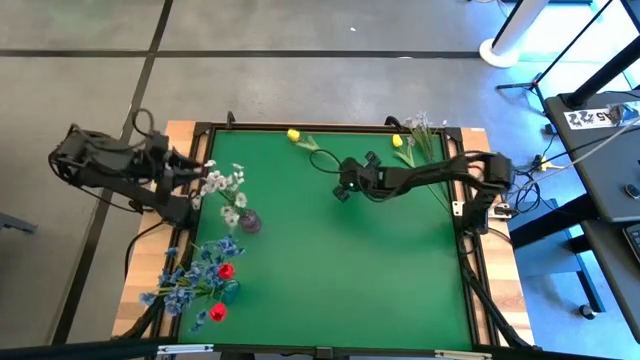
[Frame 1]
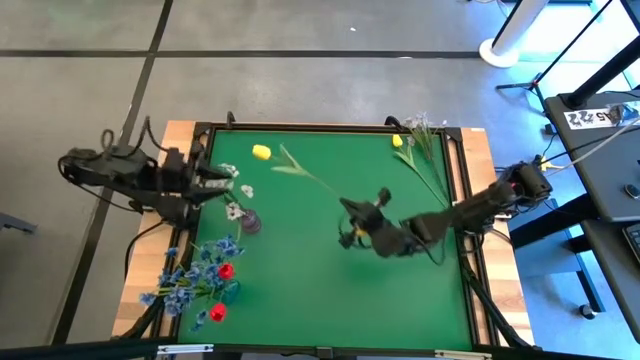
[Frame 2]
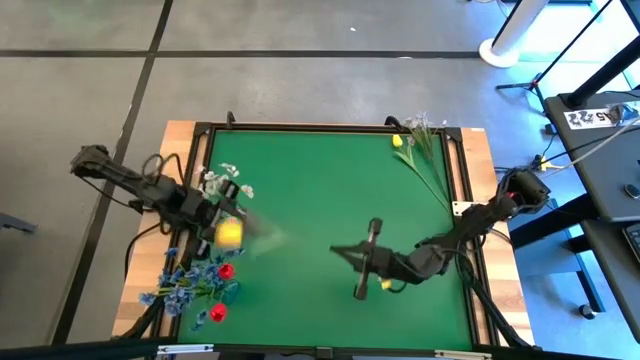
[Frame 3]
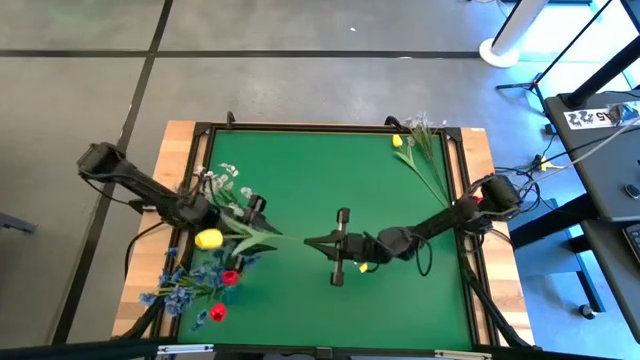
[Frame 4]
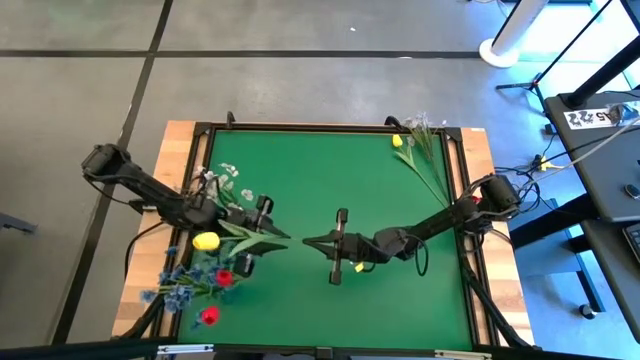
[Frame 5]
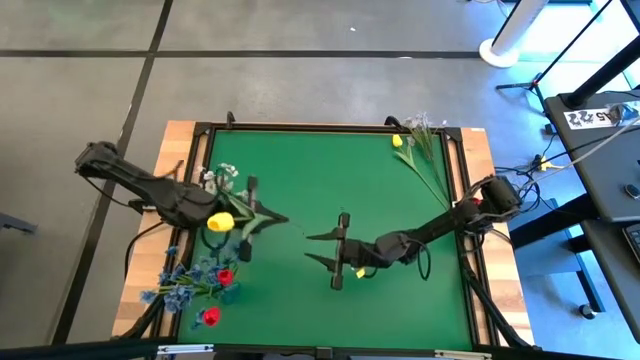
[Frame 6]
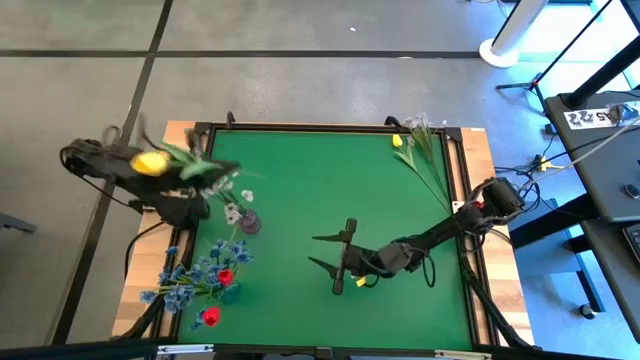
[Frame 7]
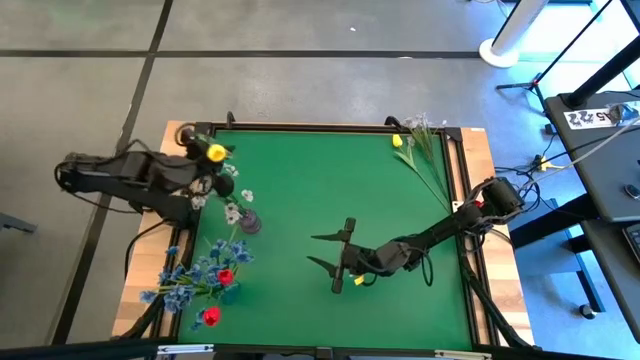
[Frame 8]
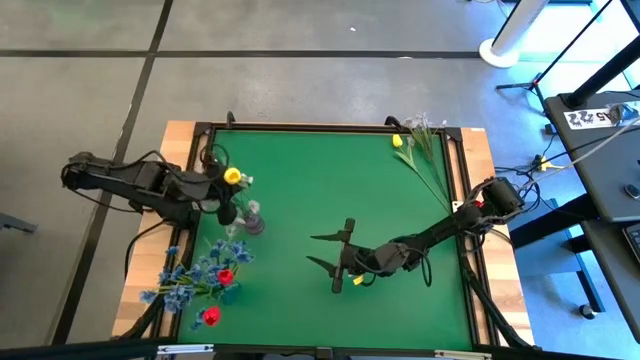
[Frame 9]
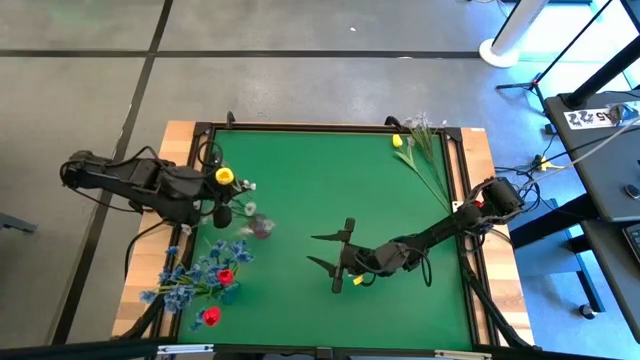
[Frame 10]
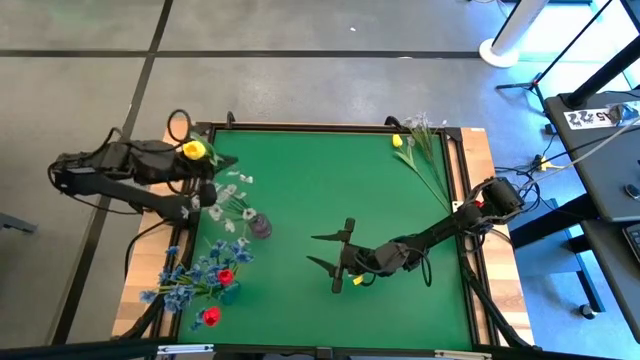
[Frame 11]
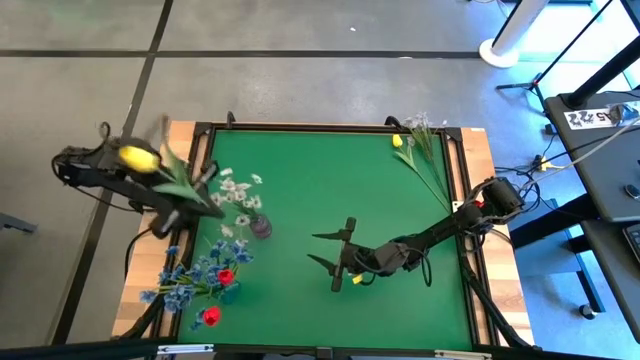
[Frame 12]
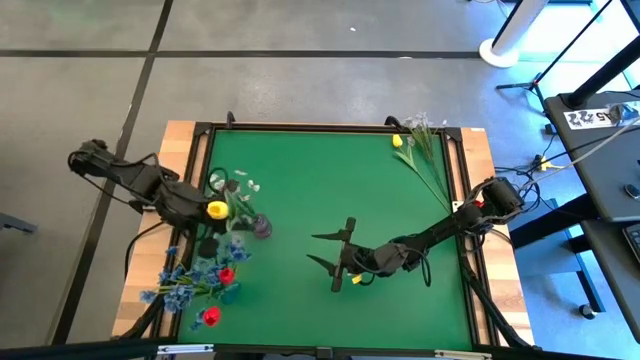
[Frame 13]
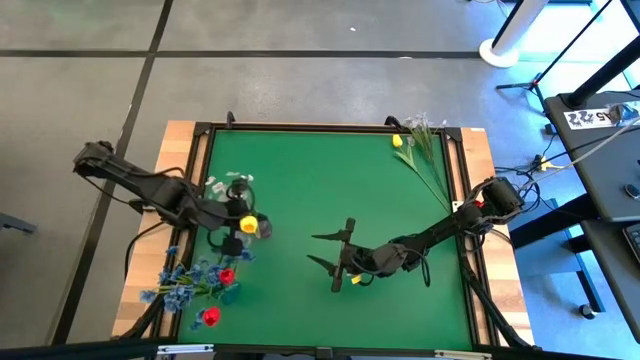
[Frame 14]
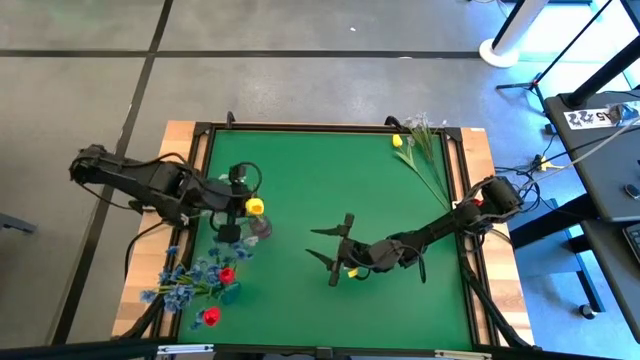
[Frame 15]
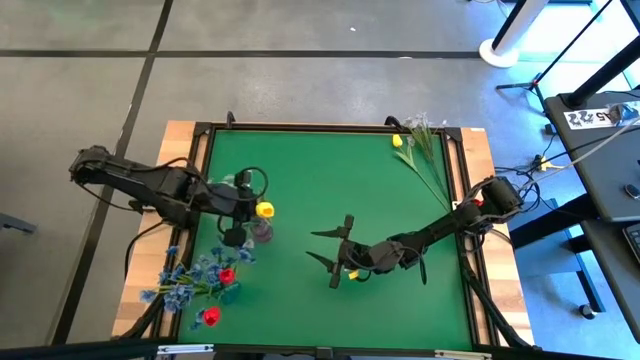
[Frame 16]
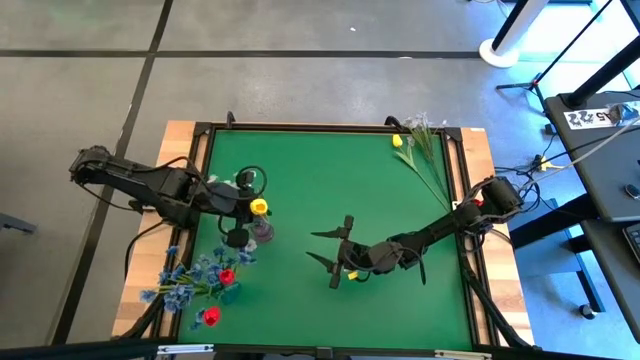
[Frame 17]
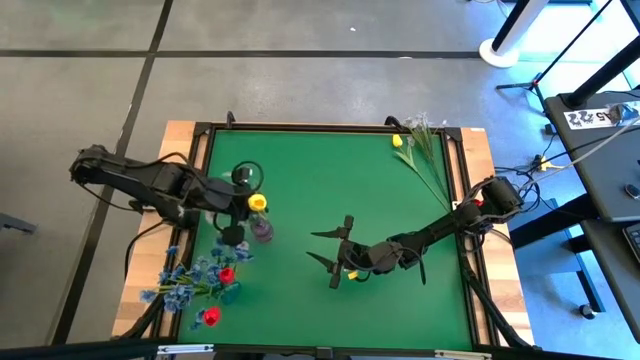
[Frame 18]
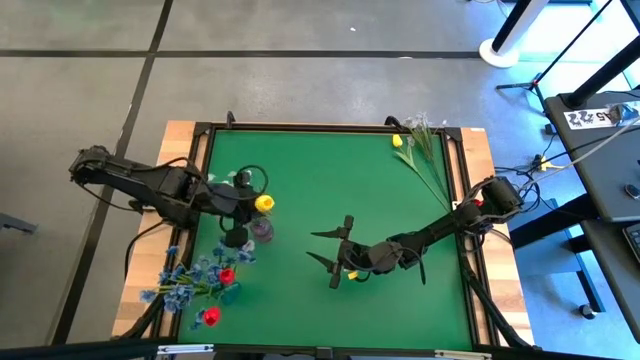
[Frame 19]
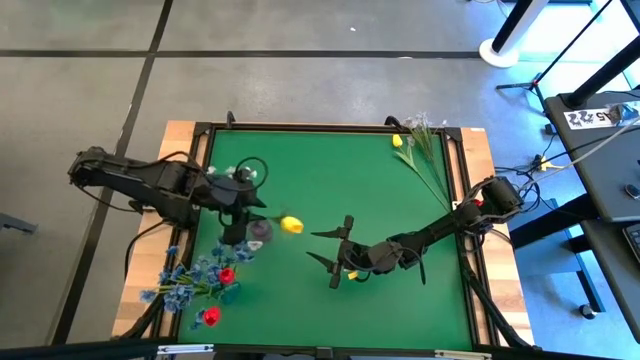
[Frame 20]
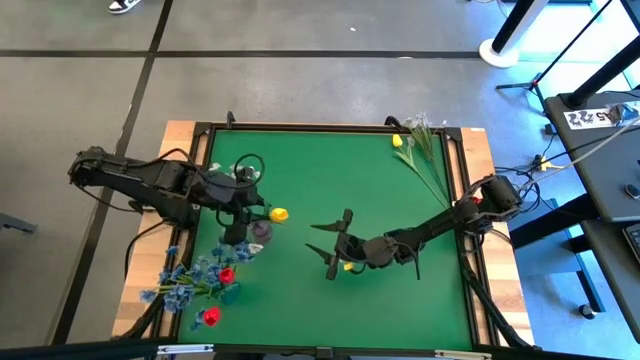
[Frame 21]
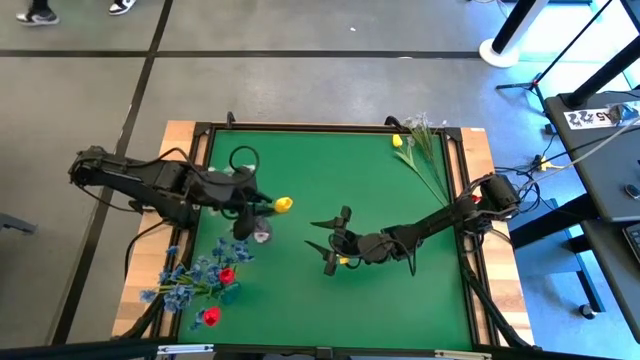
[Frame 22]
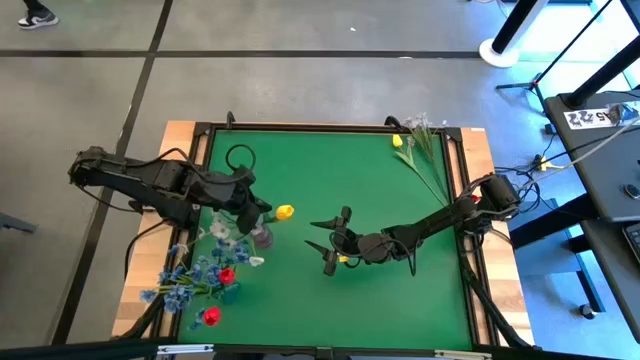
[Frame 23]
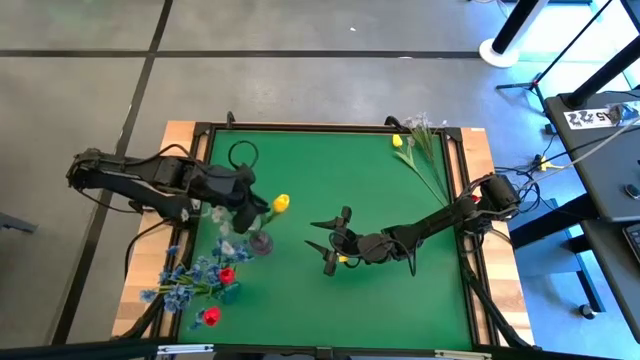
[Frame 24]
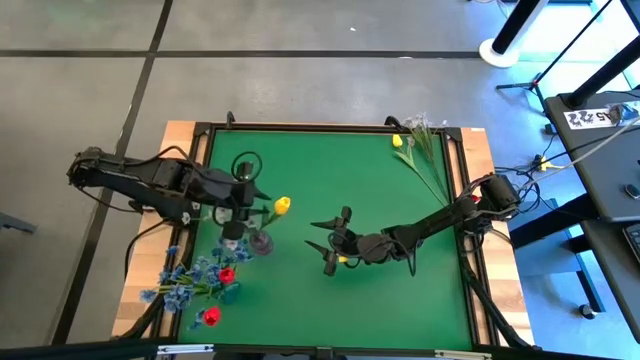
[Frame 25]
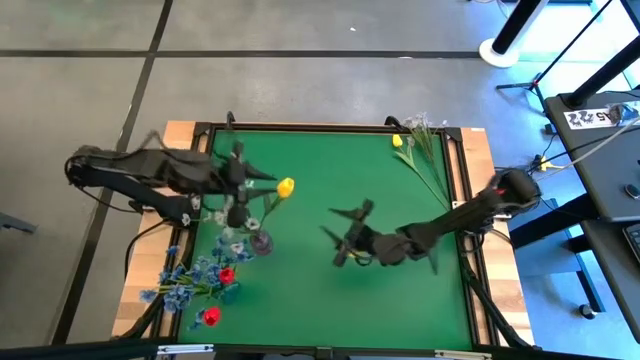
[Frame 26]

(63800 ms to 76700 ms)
Task: Sort flowers into vase by color
Put the left yellow tulip into the pink vase

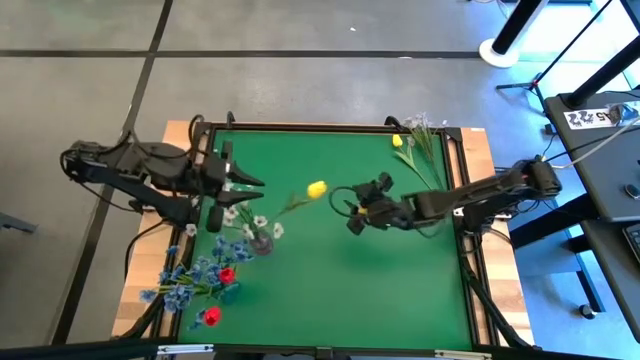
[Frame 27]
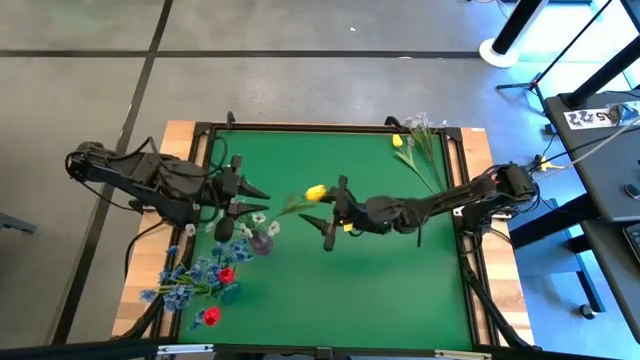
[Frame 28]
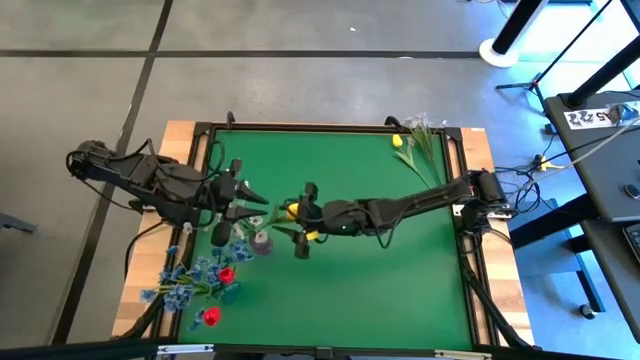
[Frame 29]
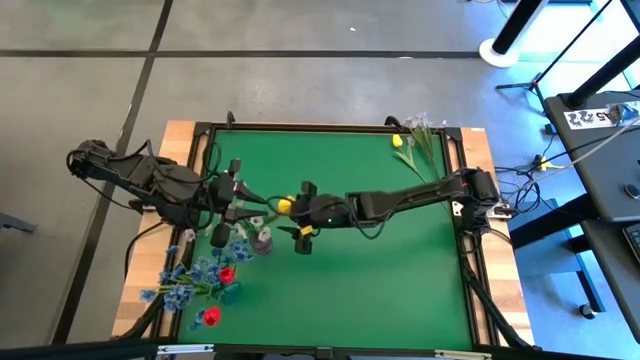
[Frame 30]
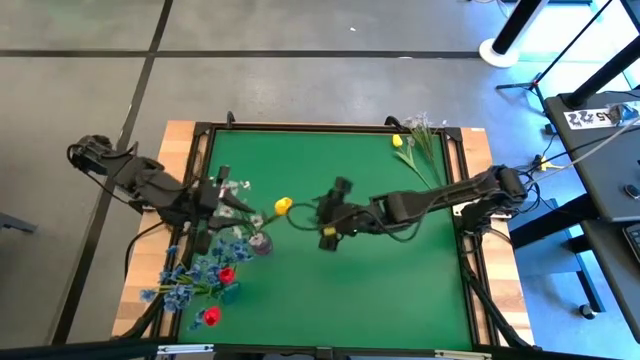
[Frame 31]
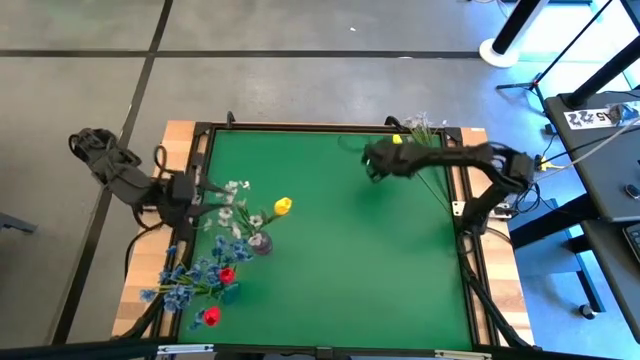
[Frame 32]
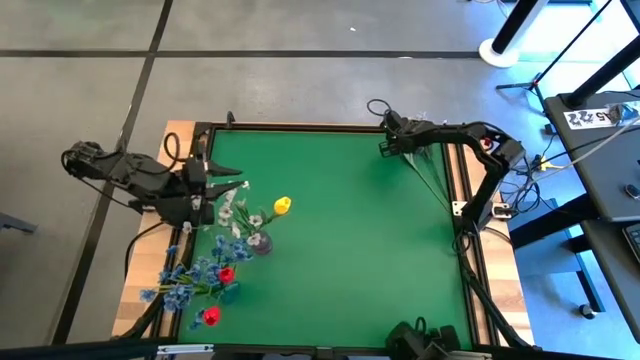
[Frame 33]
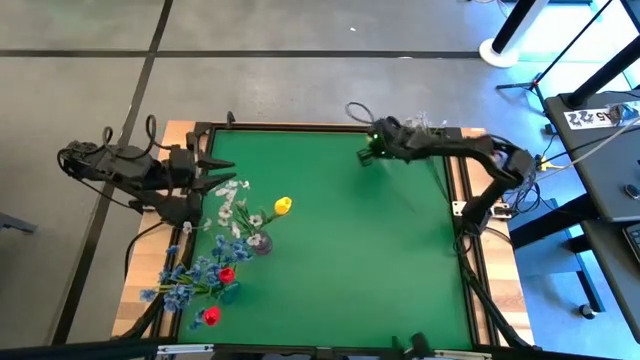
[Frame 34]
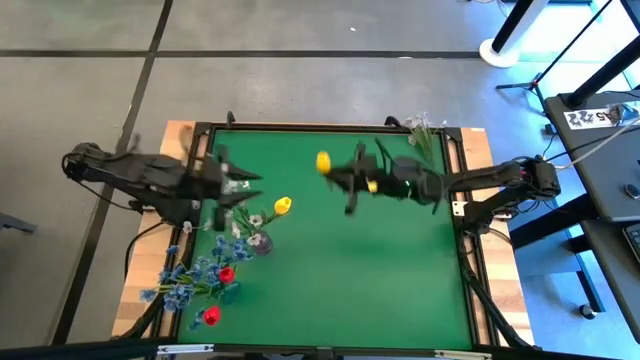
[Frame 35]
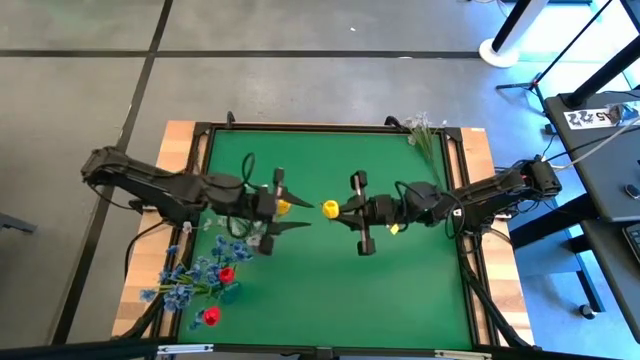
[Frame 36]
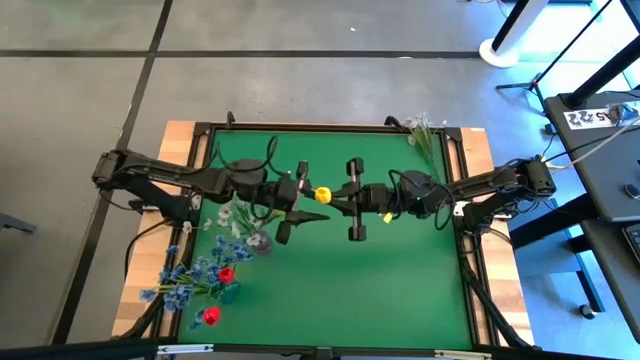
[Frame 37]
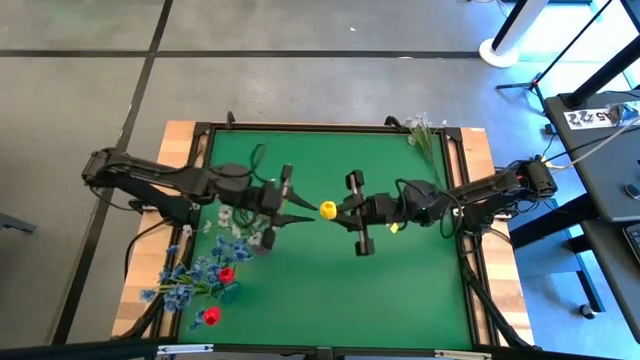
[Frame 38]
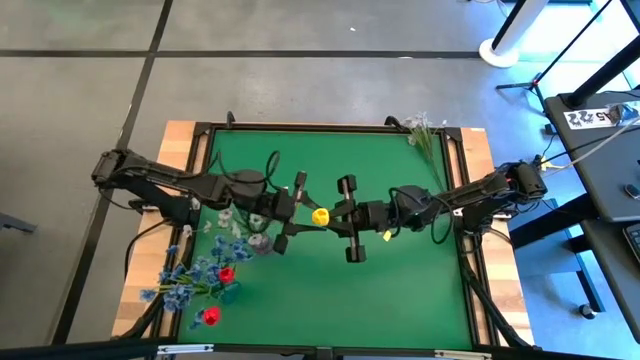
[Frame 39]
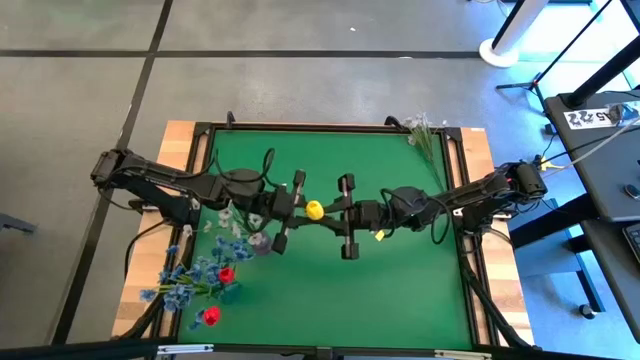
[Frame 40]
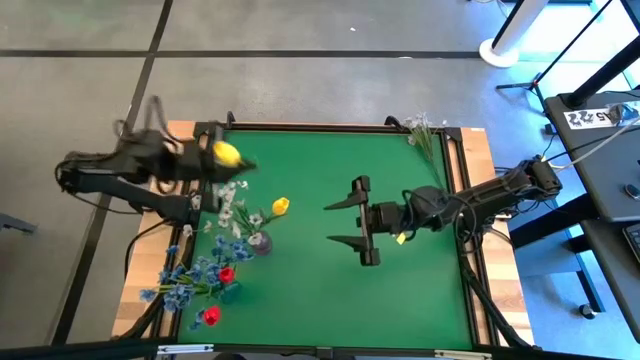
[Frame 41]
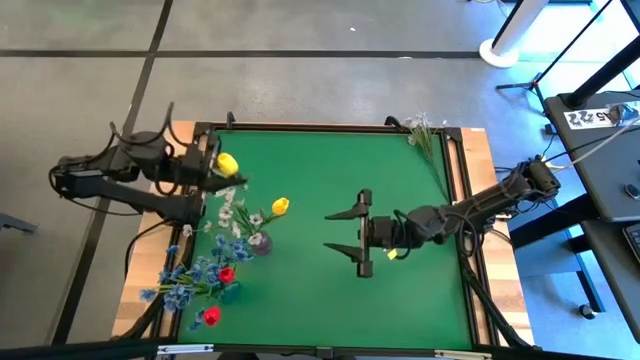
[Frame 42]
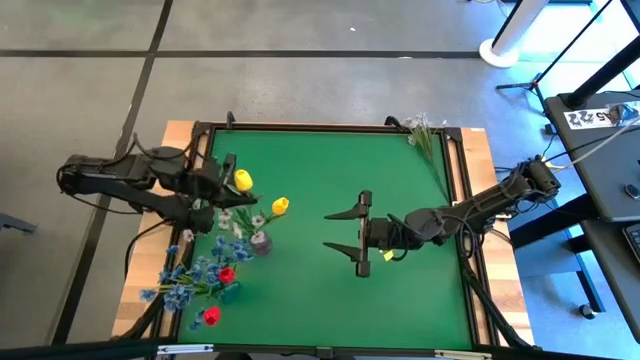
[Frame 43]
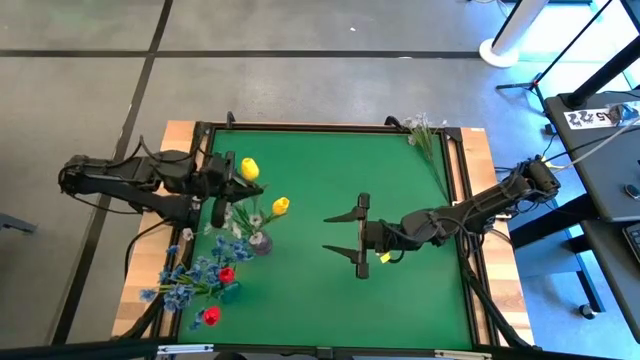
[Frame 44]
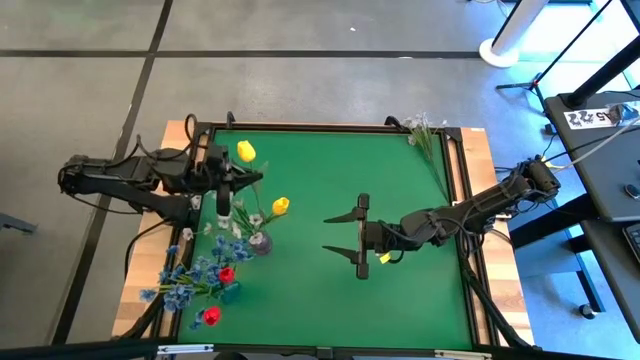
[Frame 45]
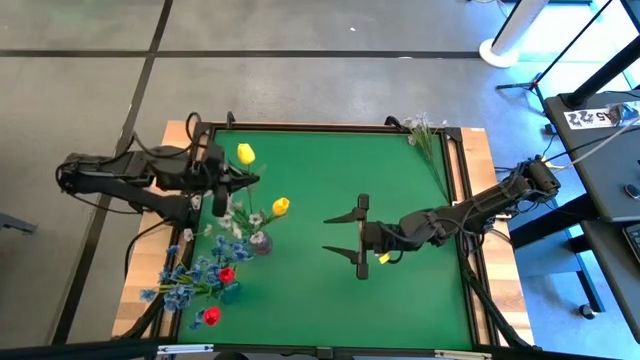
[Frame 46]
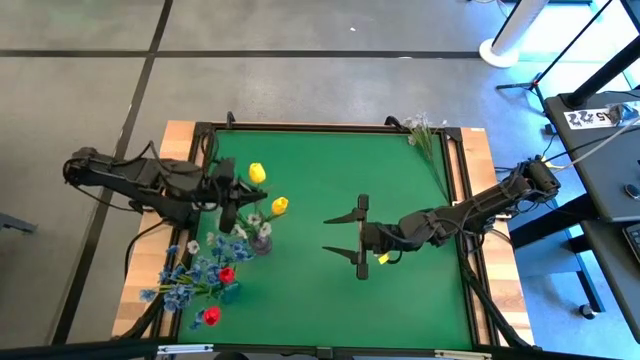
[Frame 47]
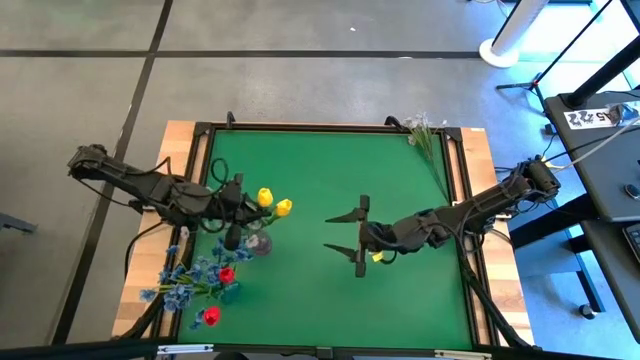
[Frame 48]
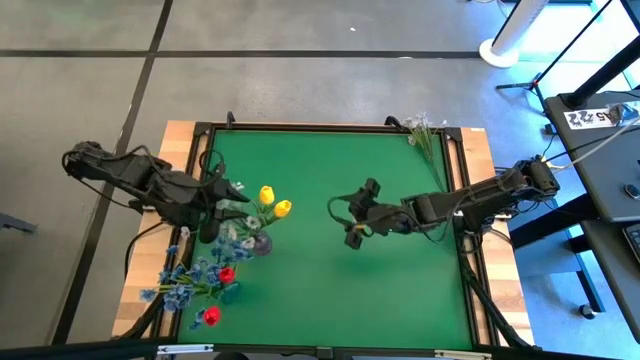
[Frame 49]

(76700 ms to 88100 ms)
Put the yellow tulip into the pink vase
